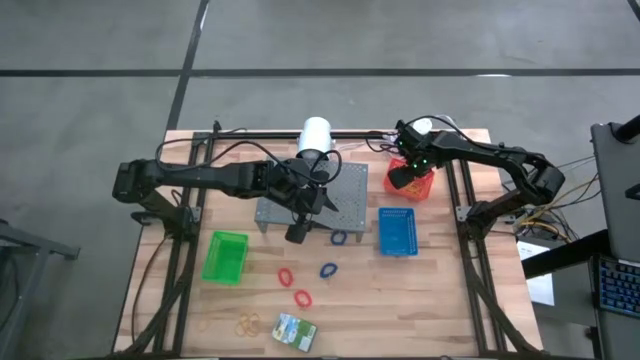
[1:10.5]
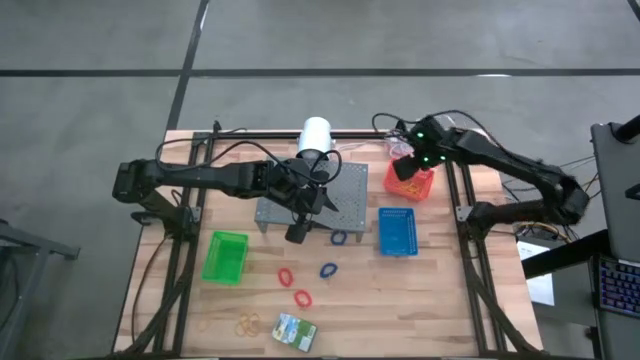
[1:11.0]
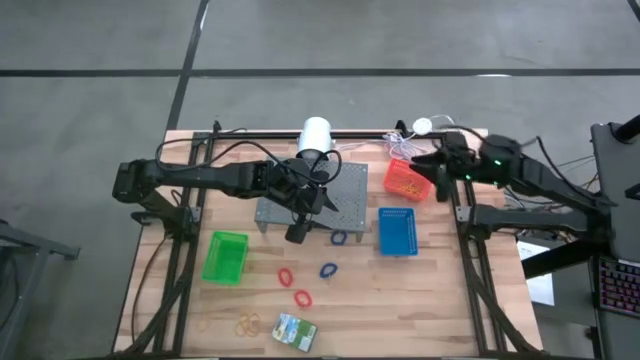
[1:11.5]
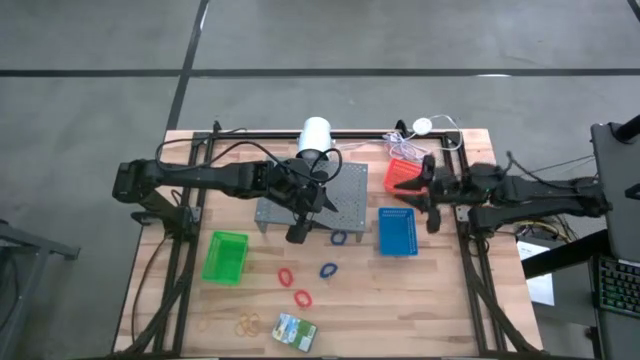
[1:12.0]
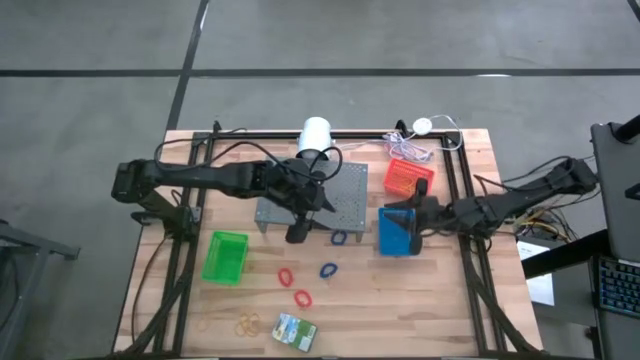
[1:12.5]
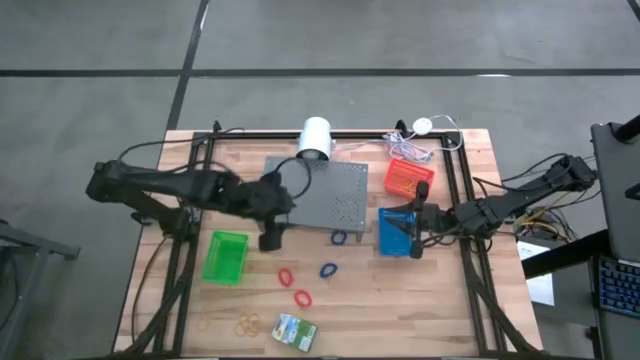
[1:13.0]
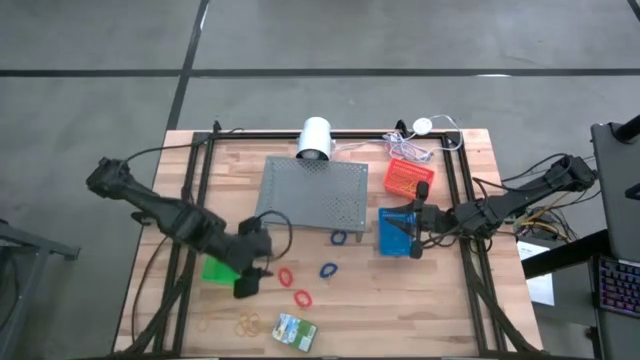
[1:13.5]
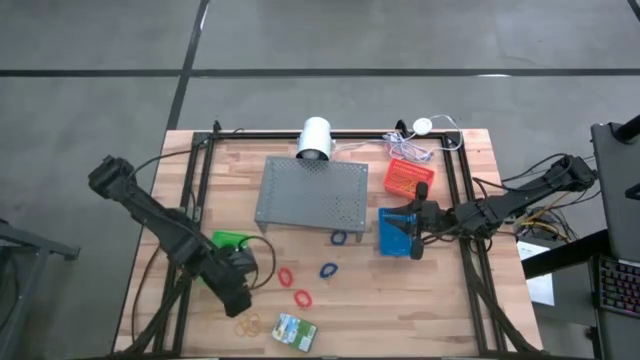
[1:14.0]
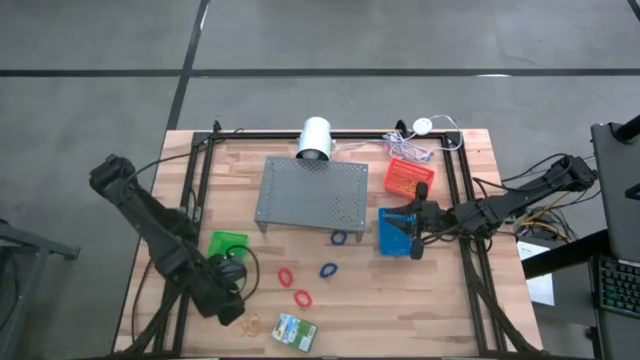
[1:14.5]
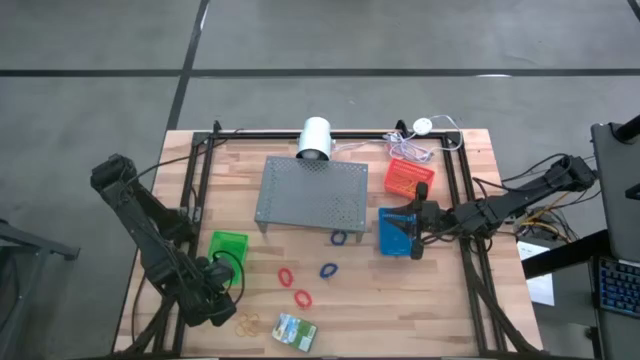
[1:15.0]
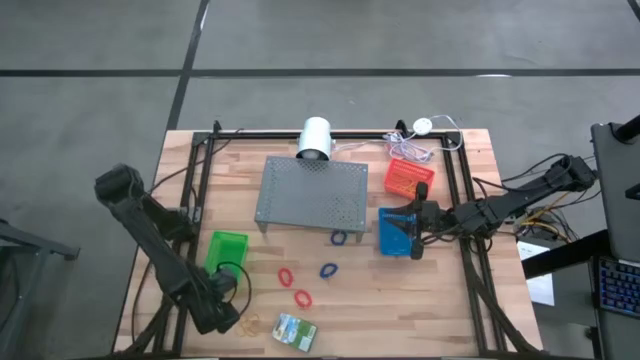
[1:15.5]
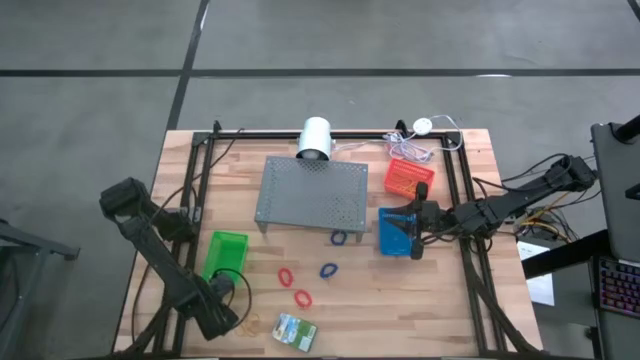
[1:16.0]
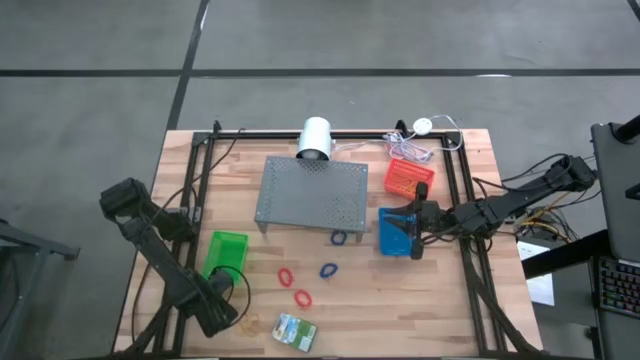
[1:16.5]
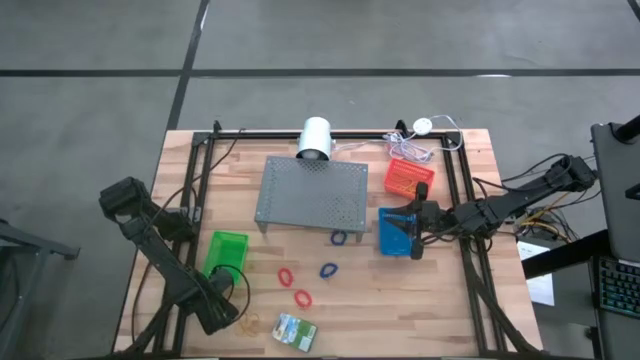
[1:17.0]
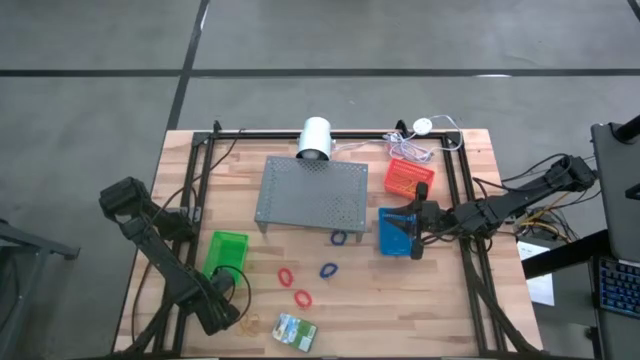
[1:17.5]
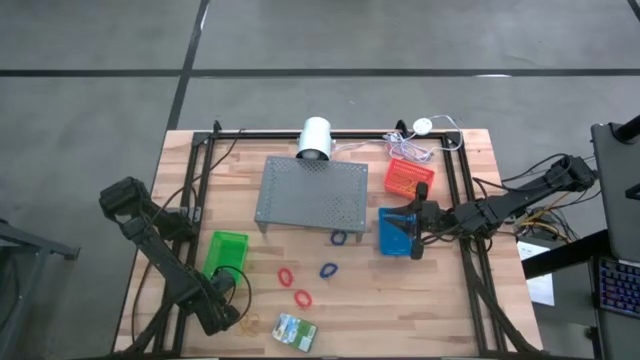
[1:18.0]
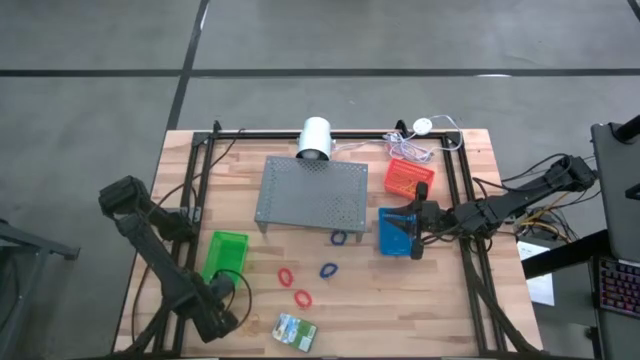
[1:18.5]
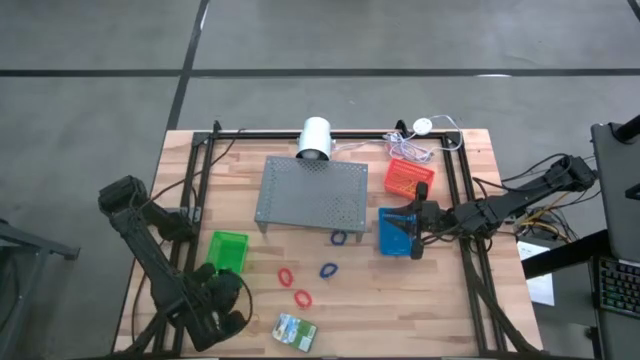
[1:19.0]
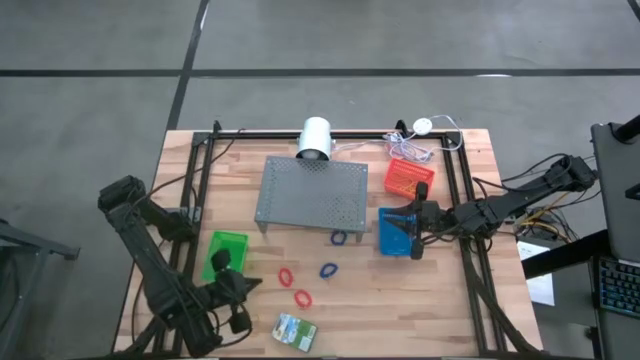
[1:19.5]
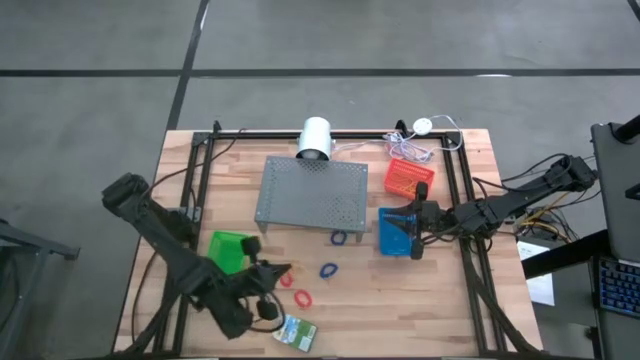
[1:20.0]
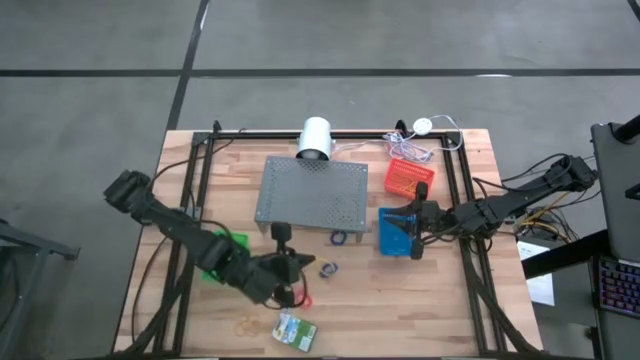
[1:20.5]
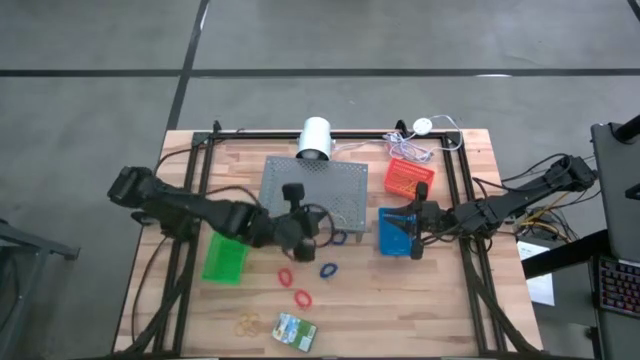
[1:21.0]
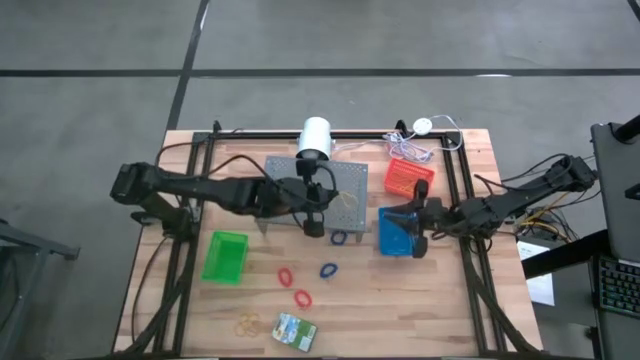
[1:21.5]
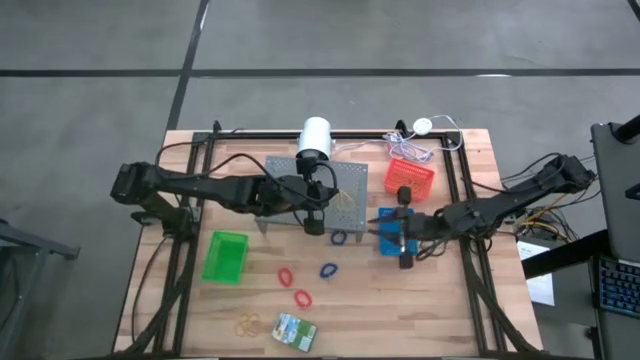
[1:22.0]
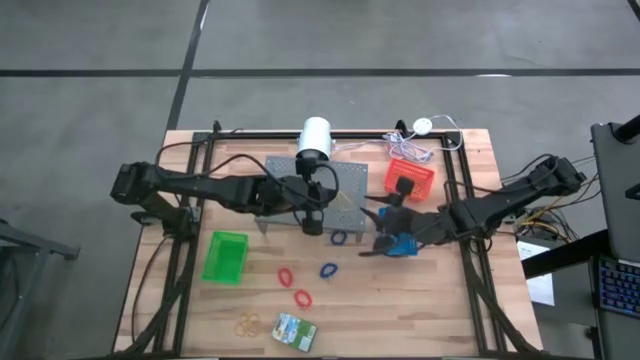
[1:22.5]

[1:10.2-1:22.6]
Task: Pick & Place Office Desk Supplies
Put the yellow rubber band into the orange bin

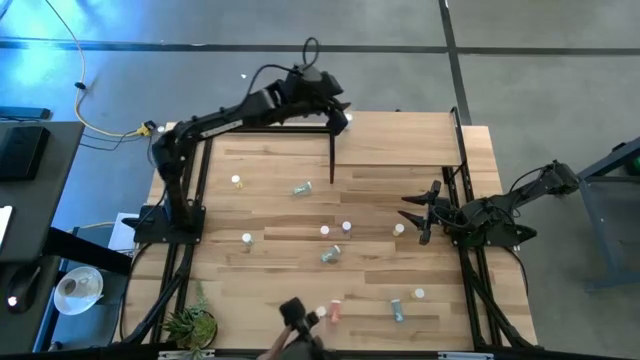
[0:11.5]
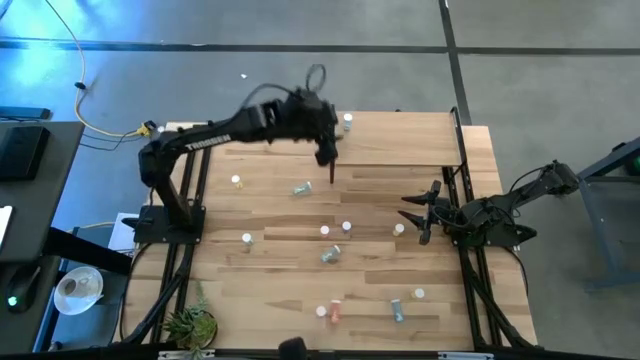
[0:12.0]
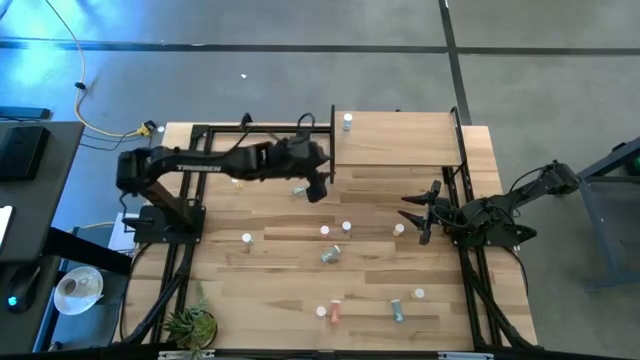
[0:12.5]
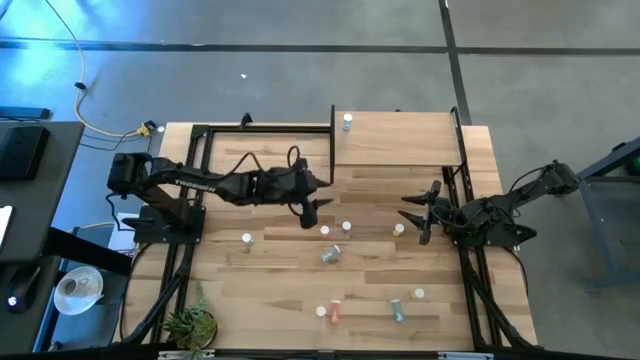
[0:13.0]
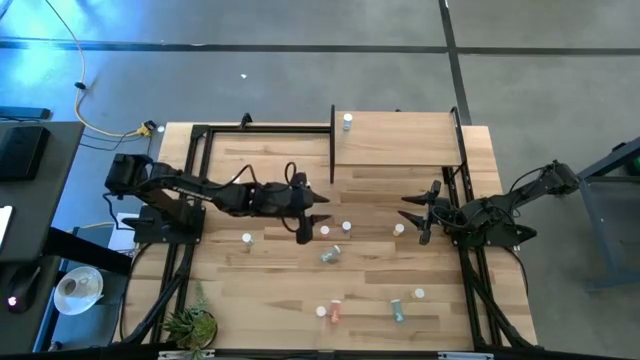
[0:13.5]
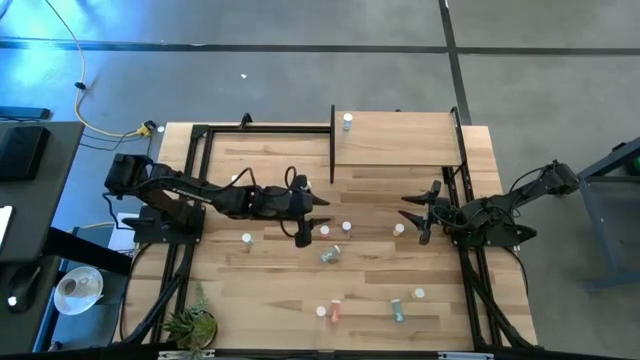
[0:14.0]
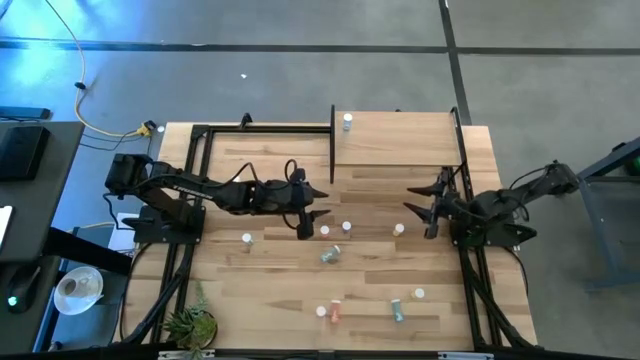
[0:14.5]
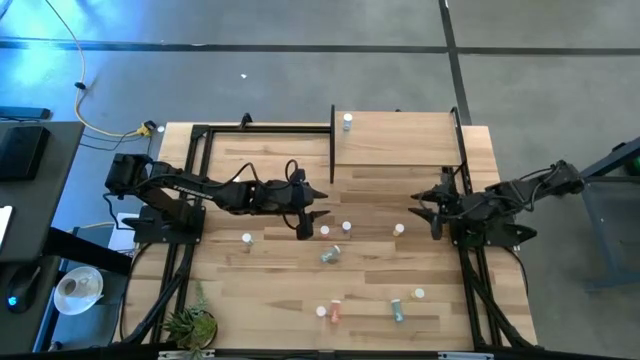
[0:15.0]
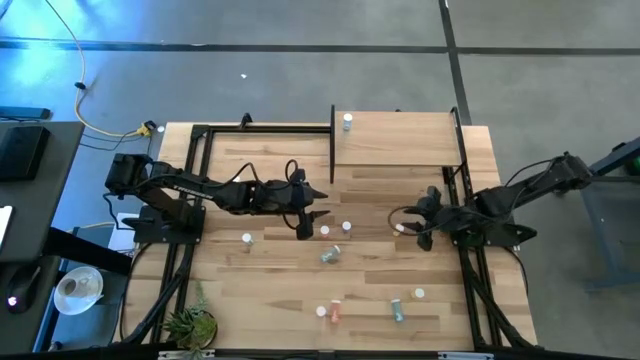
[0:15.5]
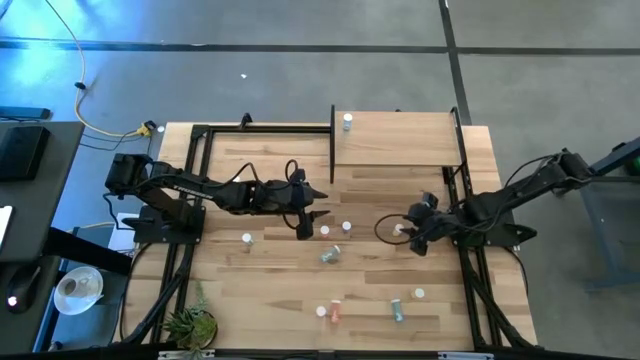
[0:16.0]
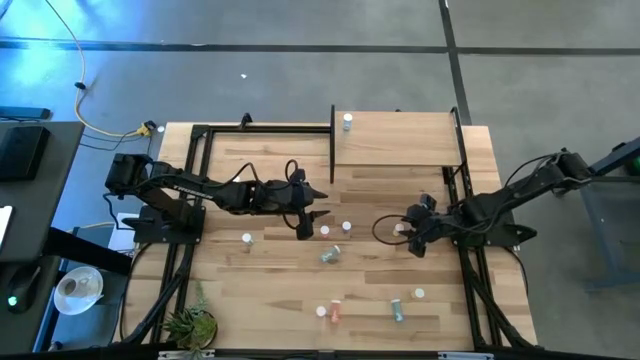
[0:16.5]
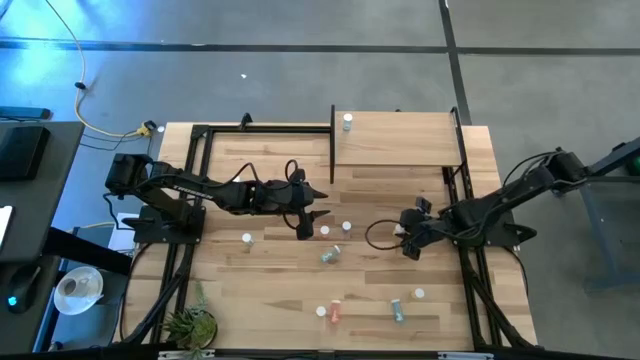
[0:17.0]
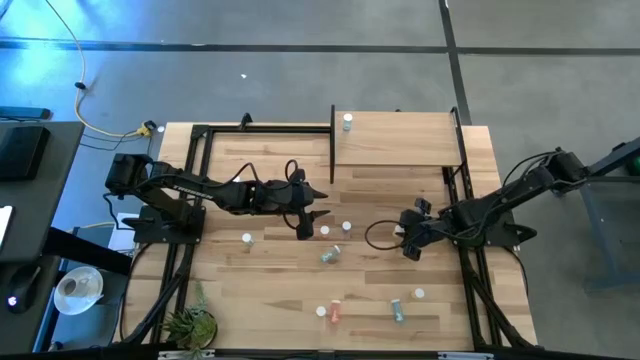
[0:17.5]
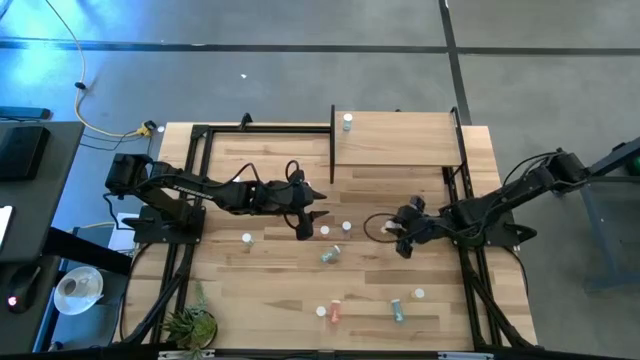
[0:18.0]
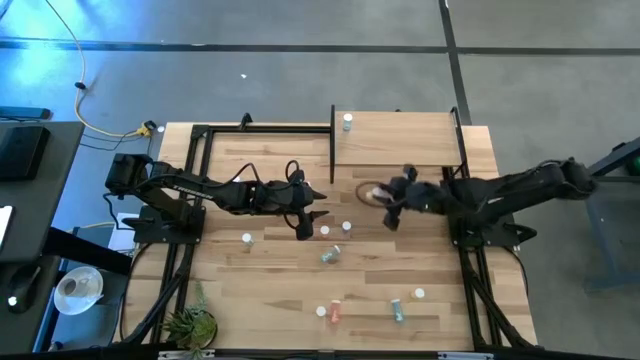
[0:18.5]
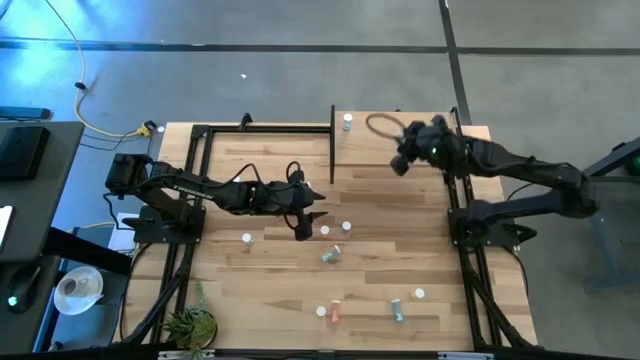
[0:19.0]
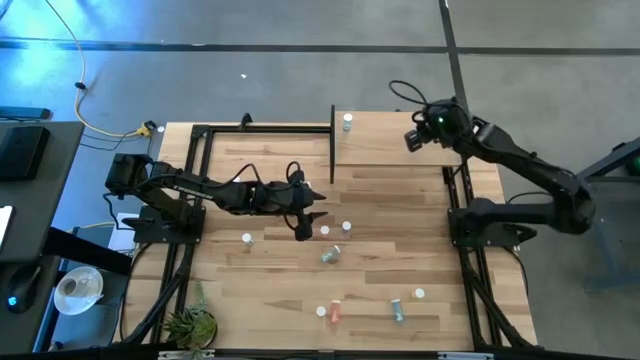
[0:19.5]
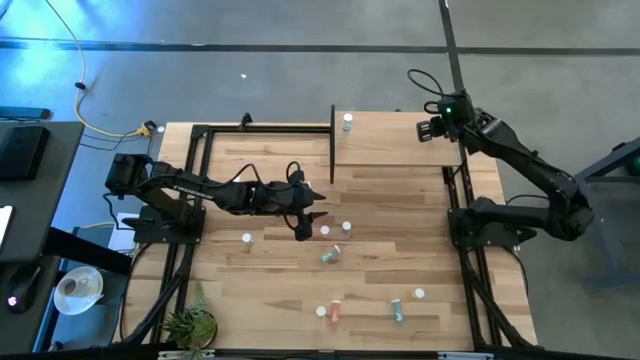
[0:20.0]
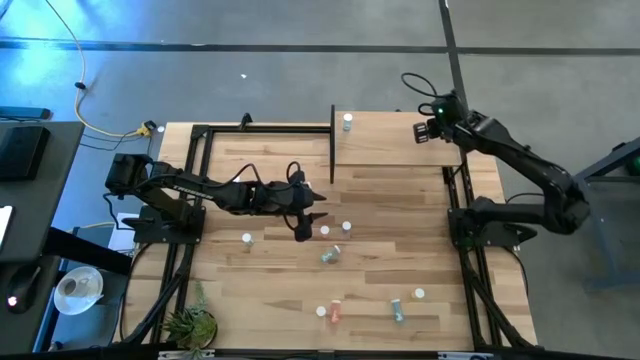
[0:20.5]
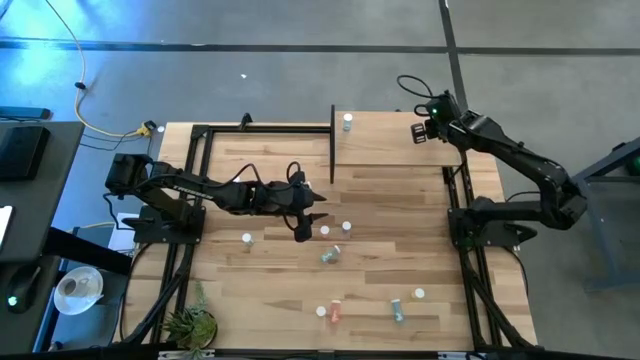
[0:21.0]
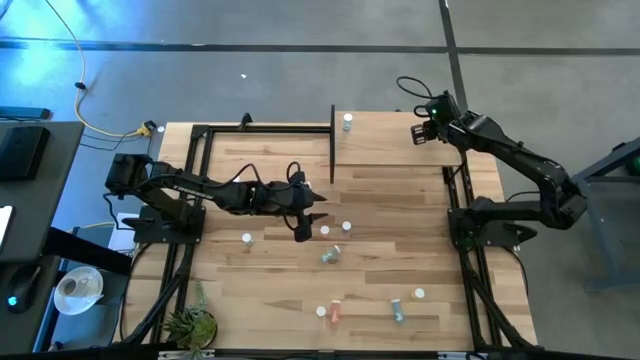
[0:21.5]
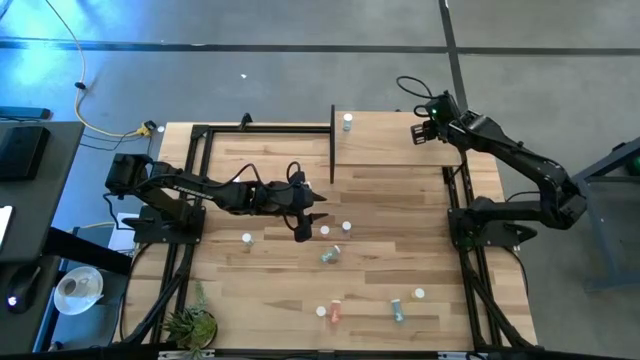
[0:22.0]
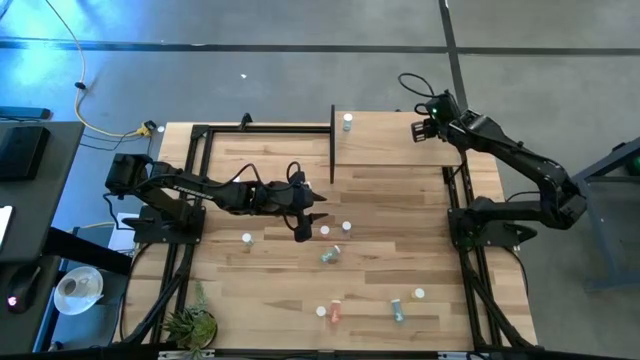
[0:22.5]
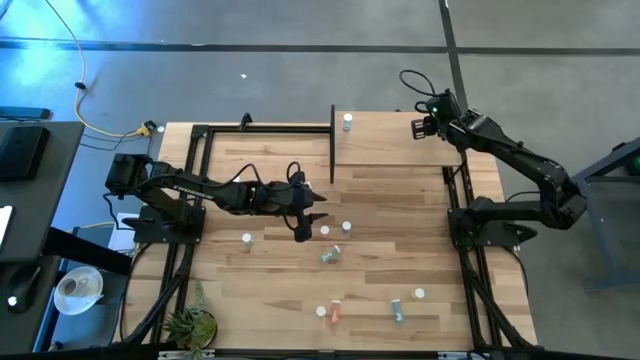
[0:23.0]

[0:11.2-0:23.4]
Task: Pick and place medicine bottles onto shelf by color
Put the middle yellow pill bottle on the shelf
